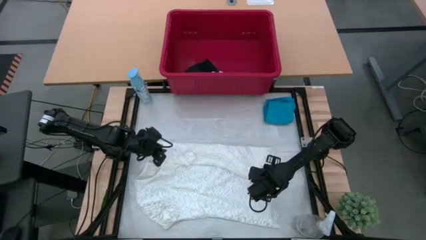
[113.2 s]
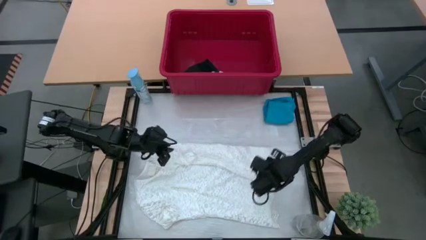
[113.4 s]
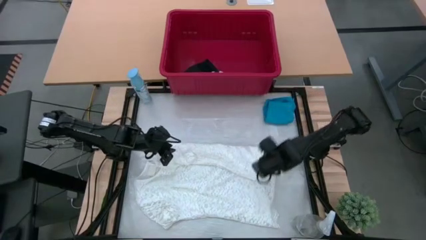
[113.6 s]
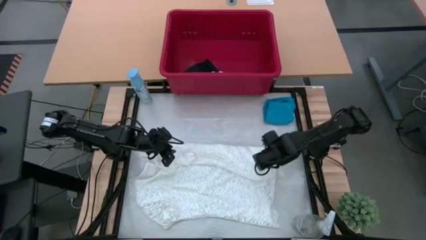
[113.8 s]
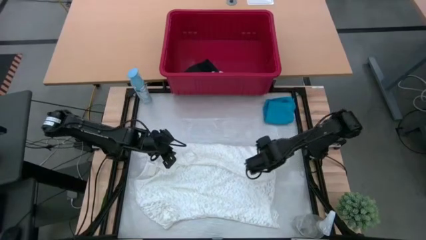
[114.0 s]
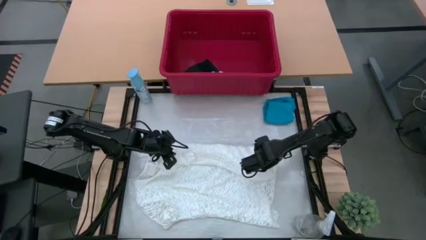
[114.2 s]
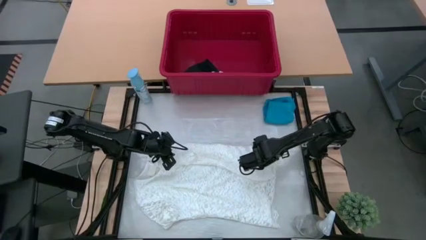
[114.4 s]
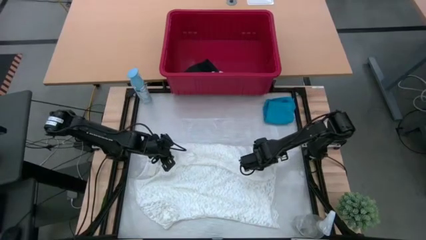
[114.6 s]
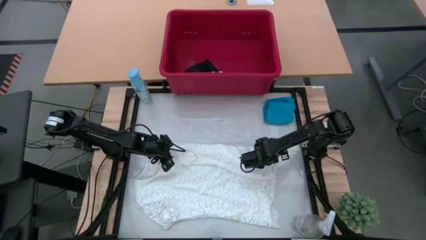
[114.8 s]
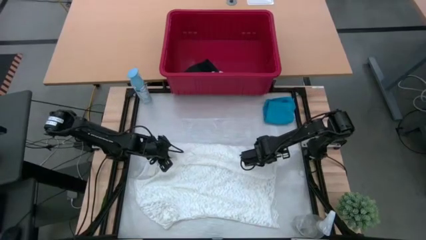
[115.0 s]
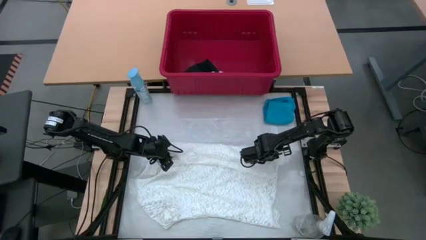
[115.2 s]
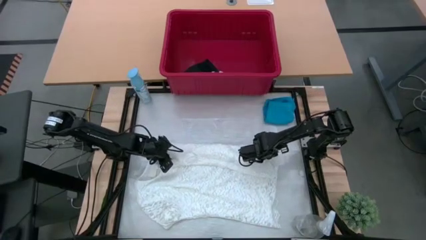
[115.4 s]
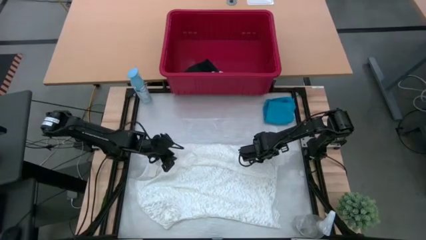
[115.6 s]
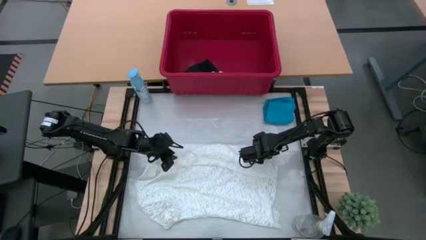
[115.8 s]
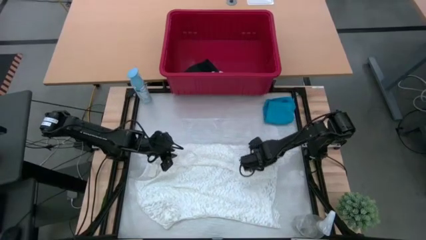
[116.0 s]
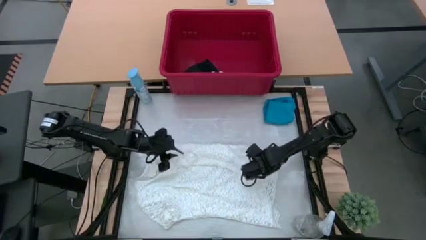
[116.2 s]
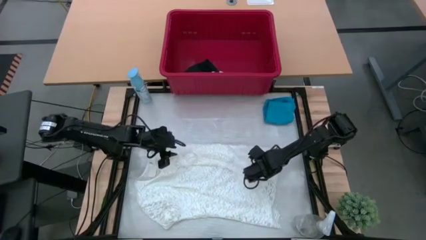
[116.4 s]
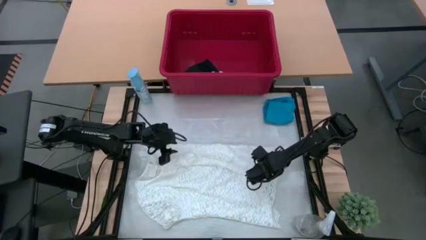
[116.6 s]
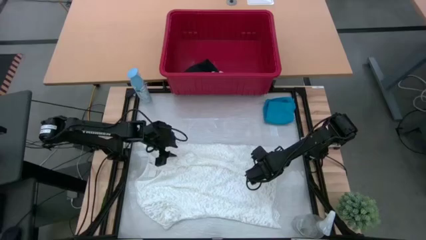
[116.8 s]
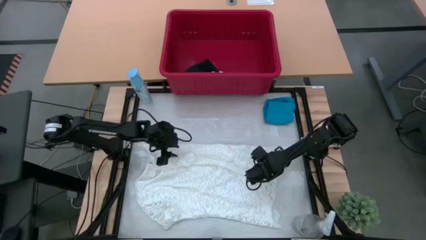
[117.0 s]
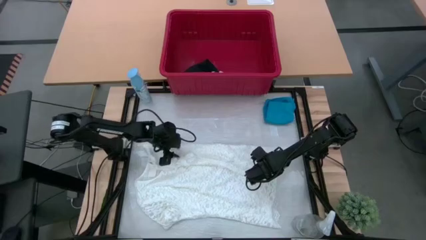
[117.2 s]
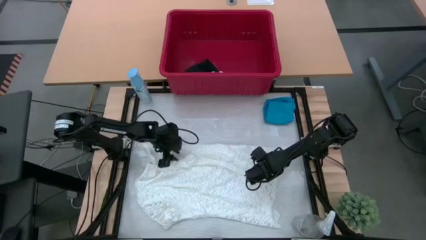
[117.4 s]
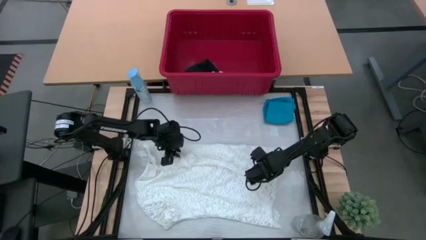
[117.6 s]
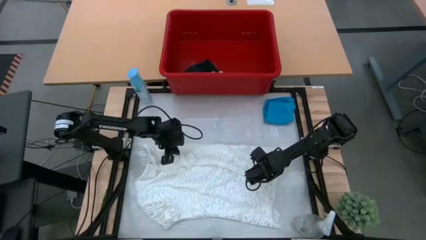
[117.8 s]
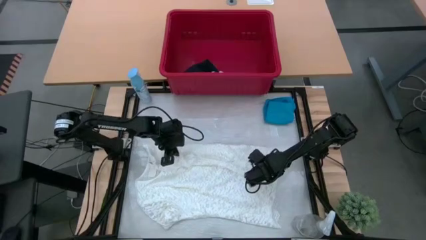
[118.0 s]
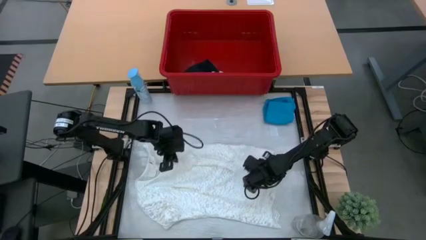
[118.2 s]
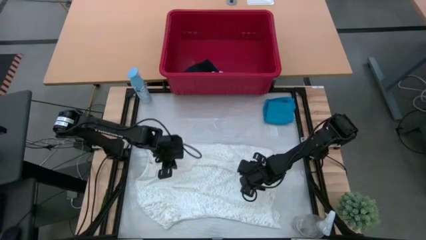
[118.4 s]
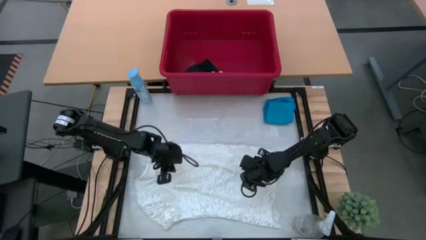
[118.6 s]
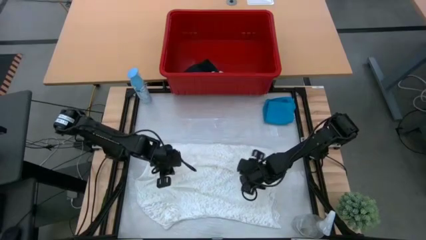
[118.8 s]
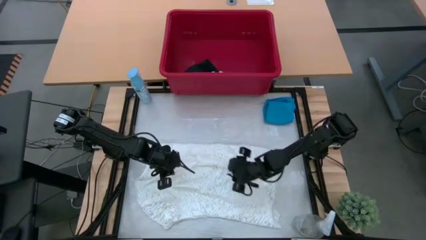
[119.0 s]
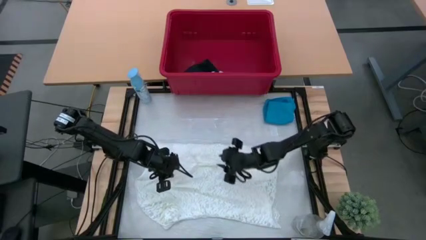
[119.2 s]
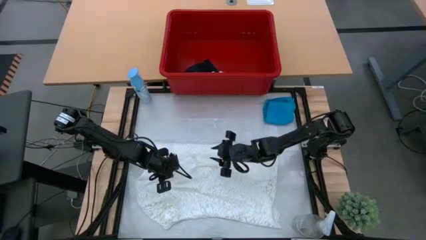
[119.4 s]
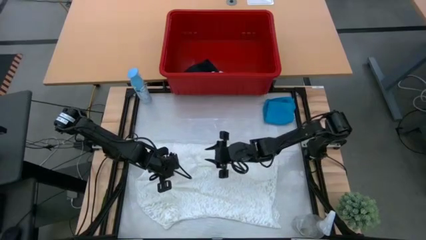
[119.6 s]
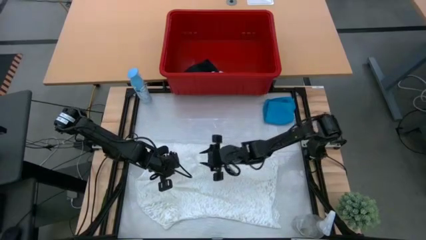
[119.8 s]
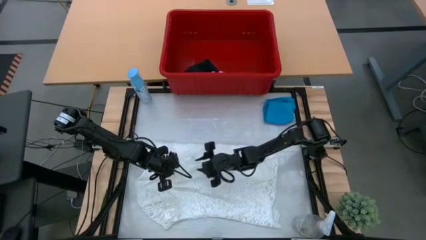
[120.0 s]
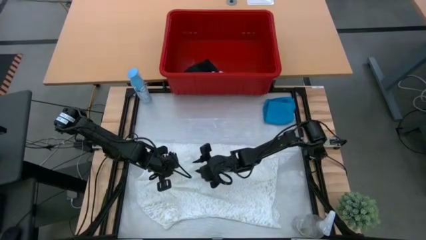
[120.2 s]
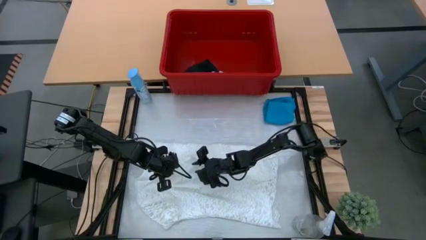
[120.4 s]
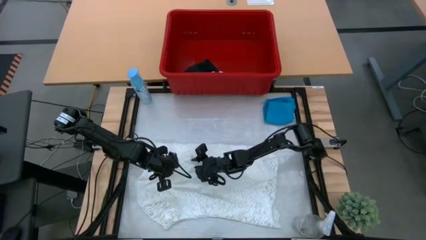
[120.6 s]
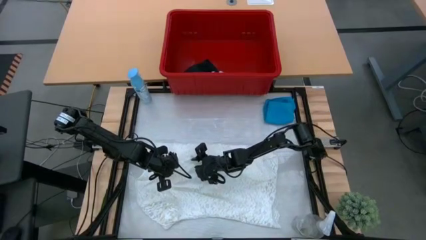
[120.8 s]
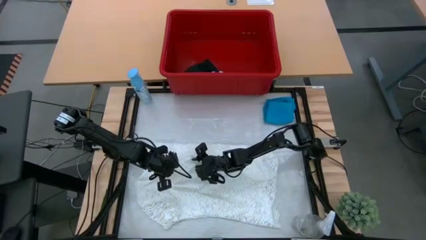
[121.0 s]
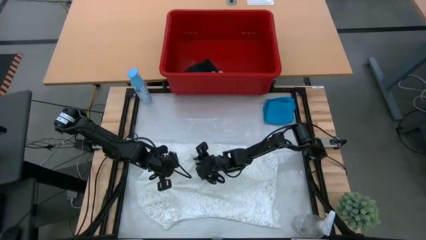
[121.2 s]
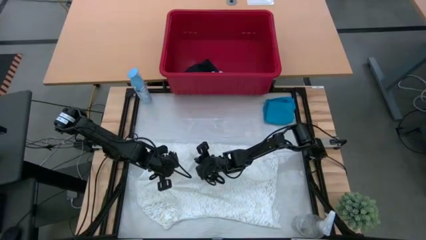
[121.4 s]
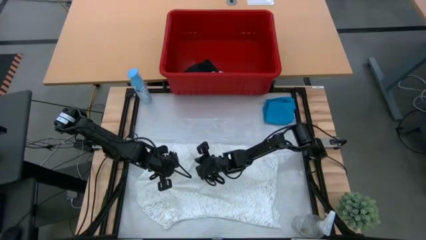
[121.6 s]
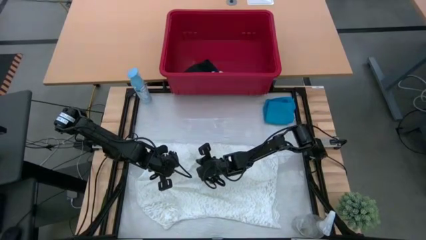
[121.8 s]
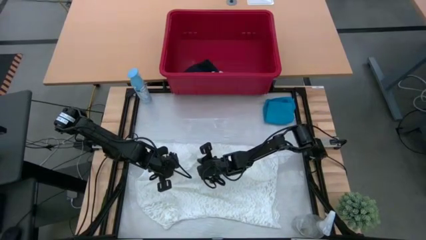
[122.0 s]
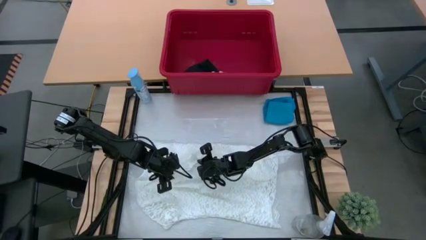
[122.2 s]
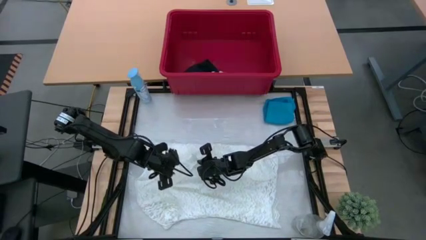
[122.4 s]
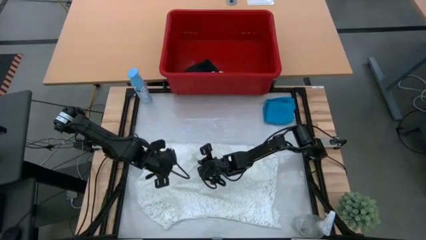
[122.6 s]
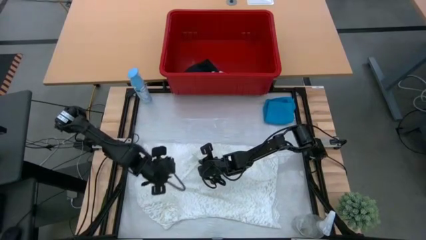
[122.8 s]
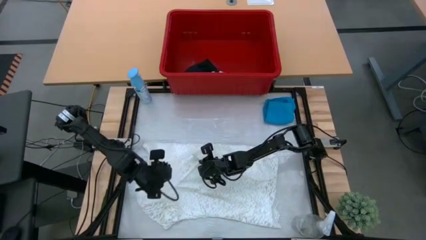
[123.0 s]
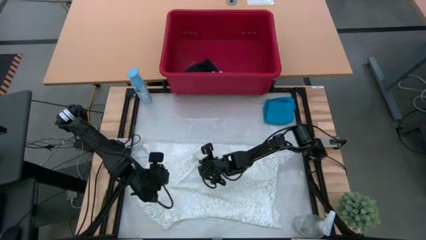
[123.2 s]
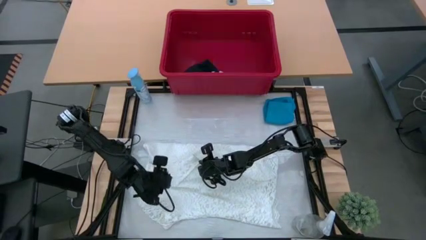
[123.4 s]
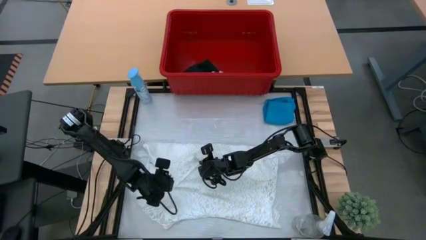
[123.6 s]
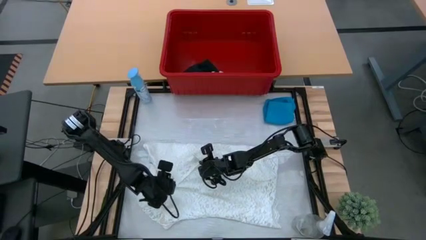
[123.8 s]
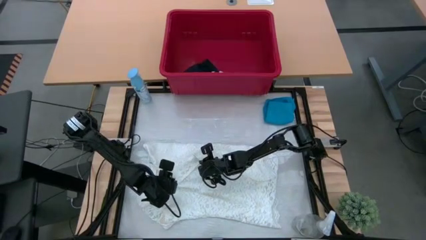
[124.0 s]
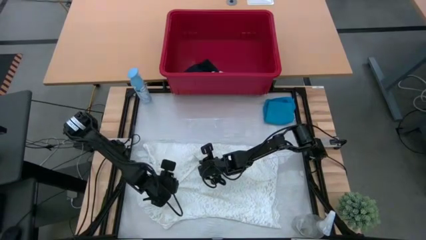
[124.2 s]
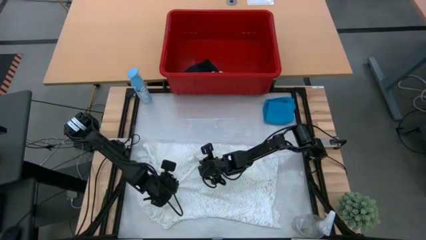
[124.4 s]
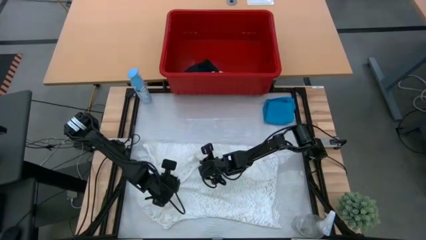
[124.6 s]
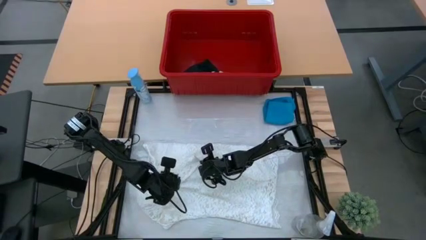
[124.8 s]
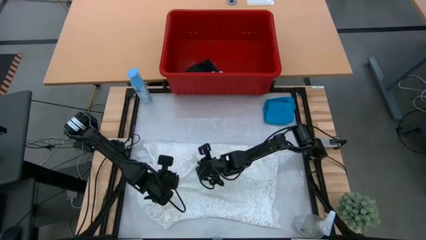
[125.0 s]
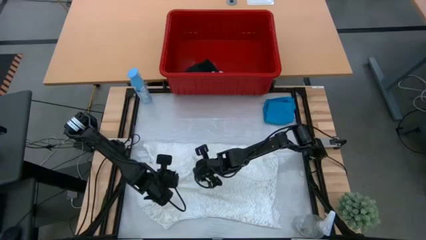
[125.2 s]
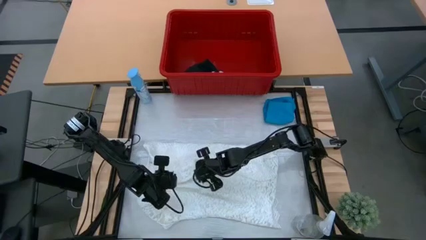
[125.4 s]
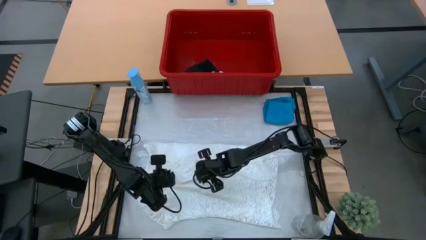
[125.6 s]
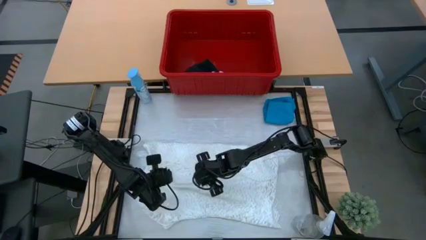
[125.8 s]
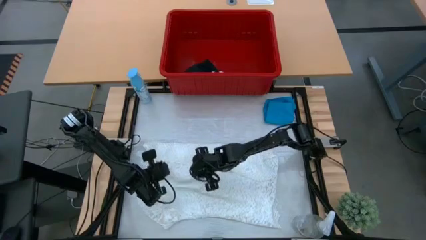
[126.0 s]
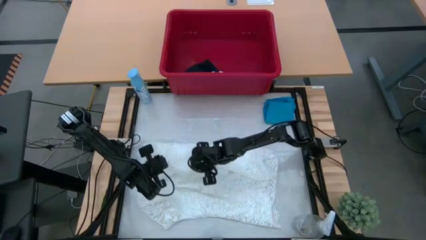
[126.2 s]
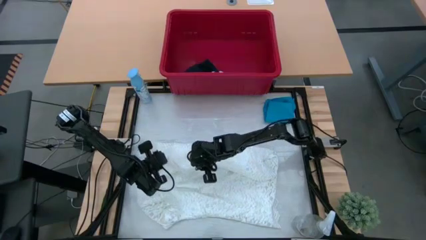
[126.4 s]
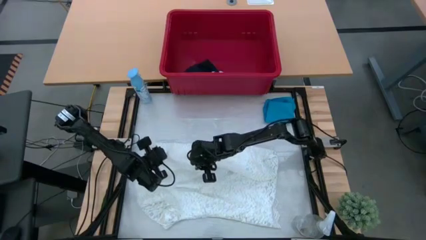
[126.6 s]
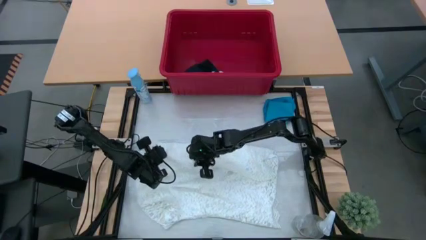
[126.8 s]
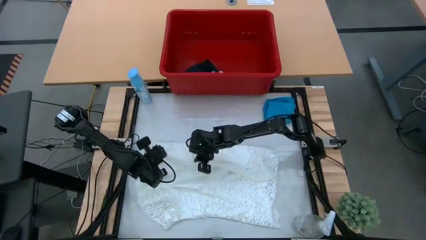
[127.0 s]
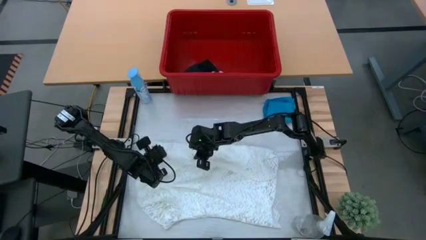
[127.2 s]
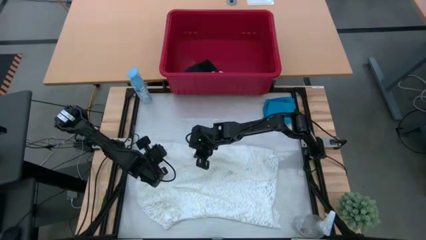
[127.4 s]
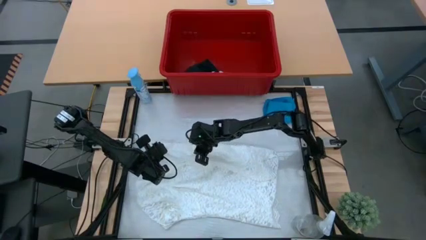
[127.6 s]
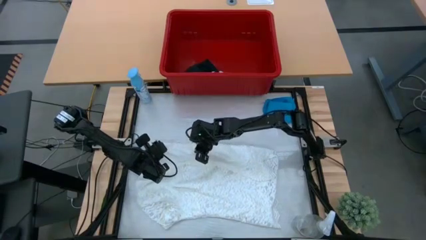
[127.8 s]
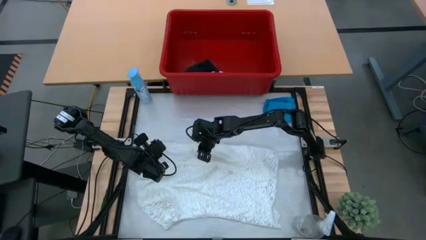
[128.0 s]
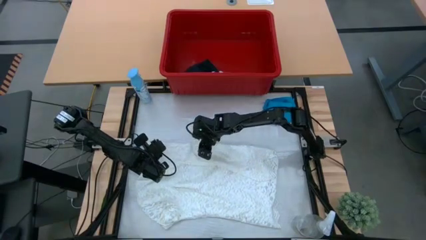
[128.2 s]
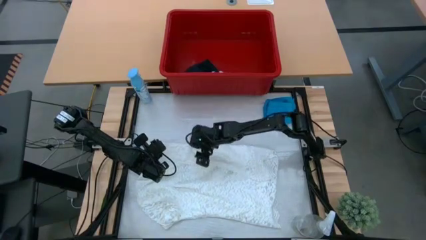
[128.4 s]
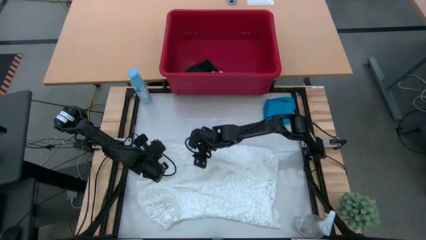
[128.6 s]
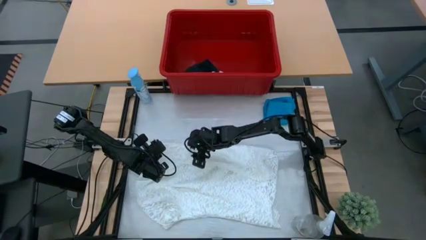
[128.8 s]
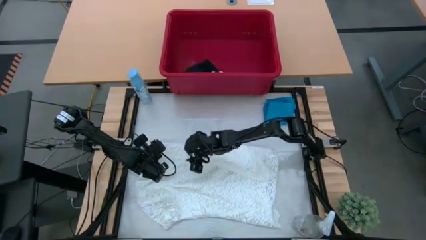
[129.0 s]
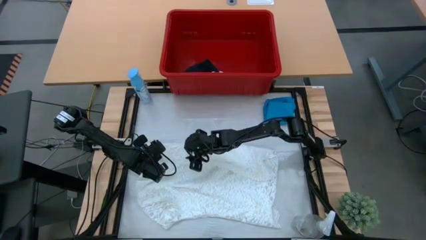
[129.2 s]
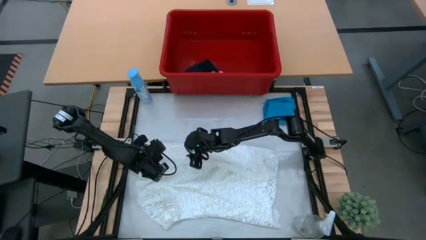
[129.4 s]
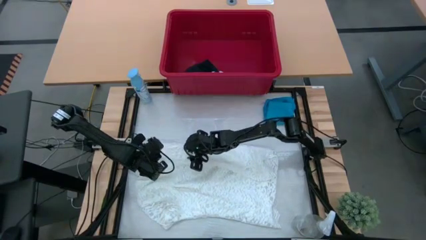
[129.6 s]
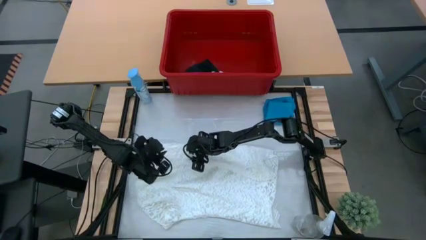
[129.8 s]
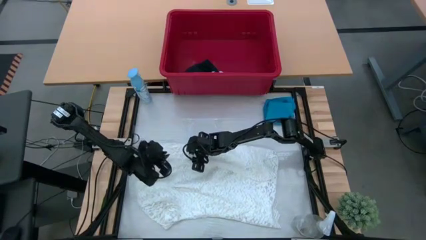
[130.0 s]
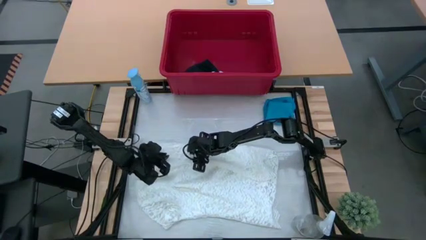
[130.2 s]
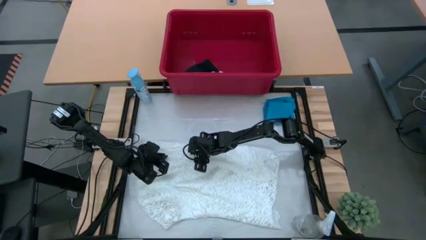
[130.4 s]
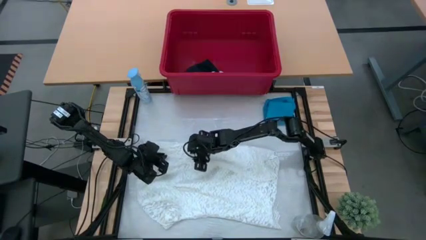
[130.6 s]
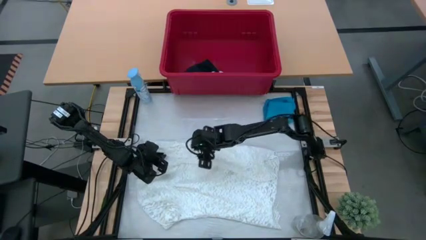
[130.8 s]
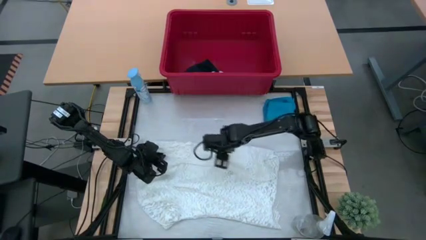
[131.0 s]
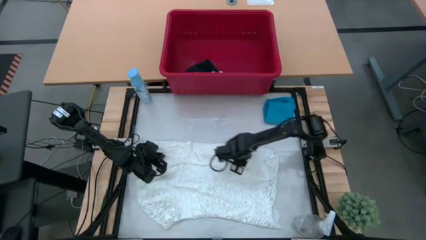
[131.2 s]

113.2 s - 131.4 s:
Task: Fold laundry
Fold the white blouse
